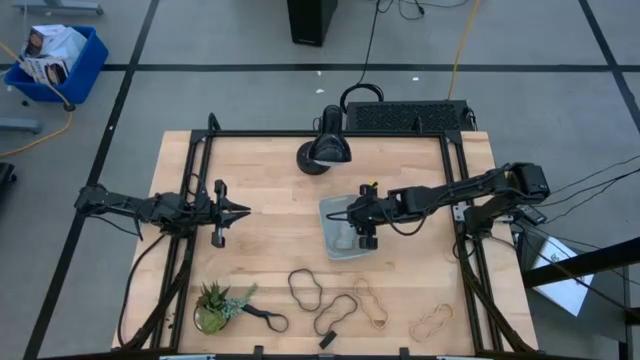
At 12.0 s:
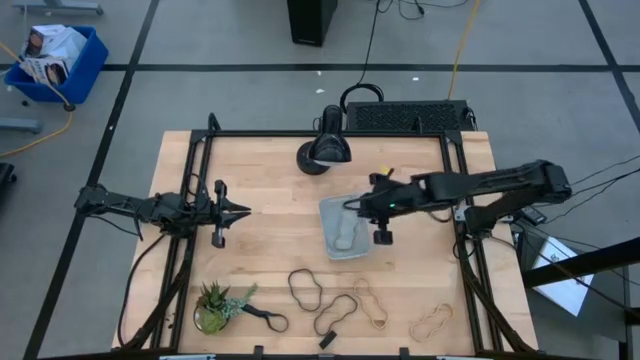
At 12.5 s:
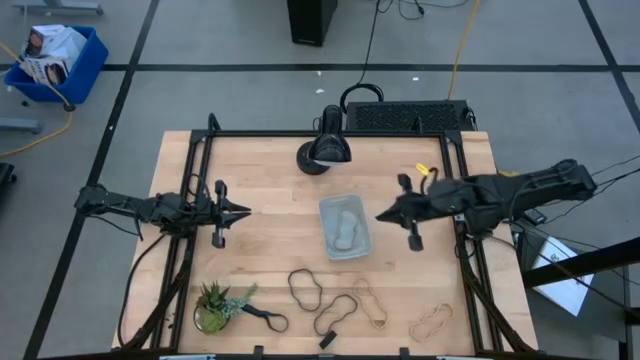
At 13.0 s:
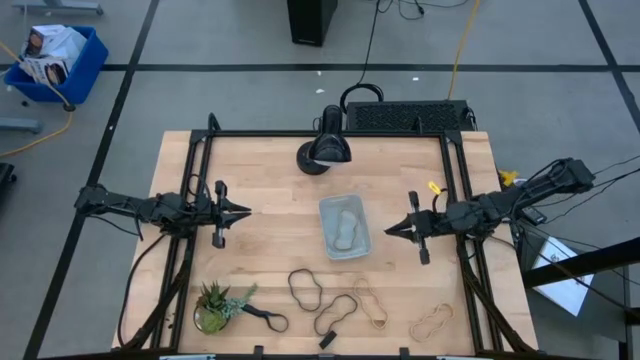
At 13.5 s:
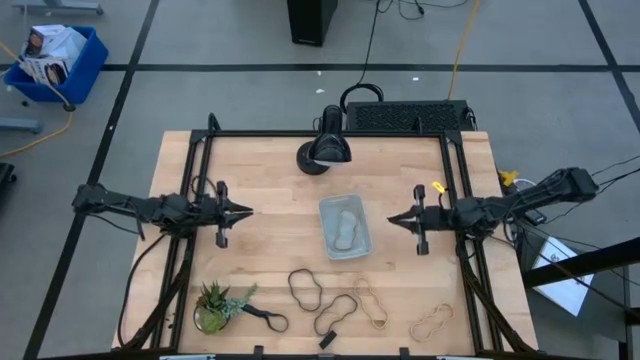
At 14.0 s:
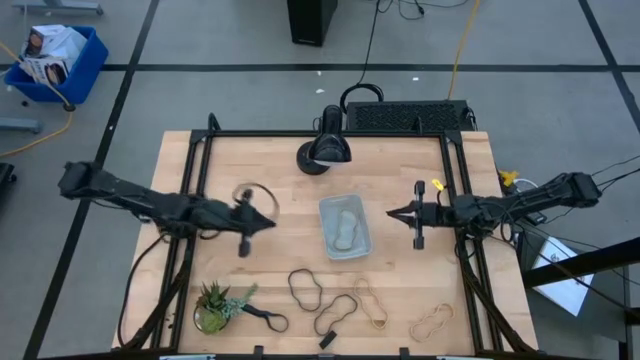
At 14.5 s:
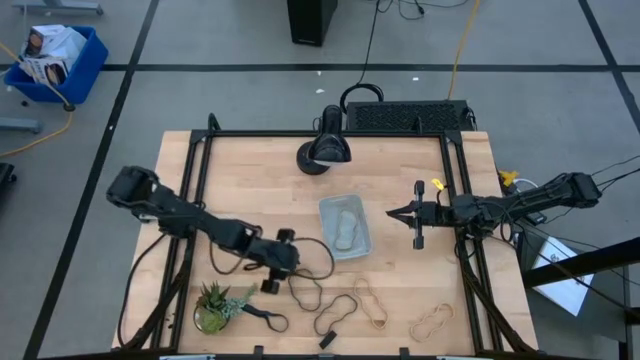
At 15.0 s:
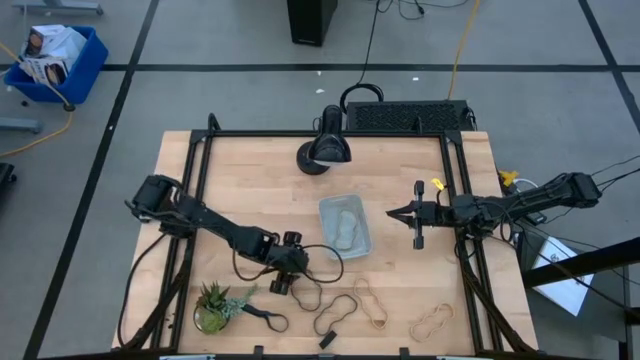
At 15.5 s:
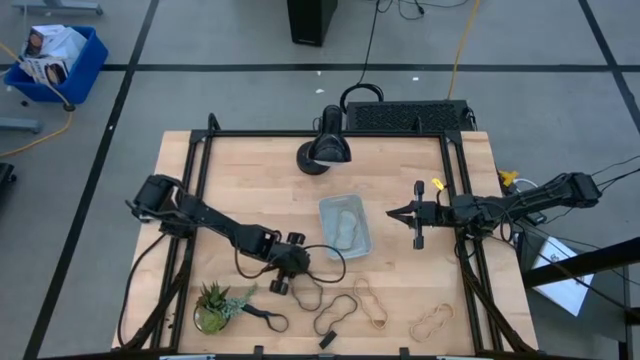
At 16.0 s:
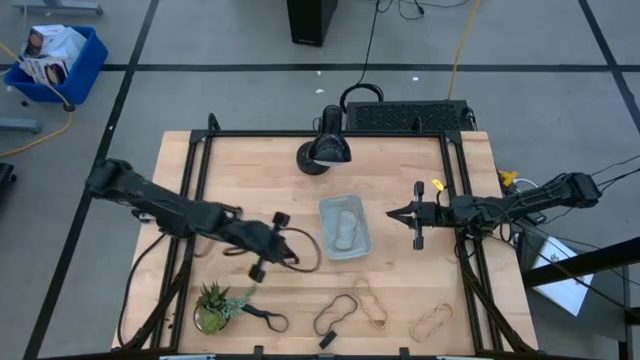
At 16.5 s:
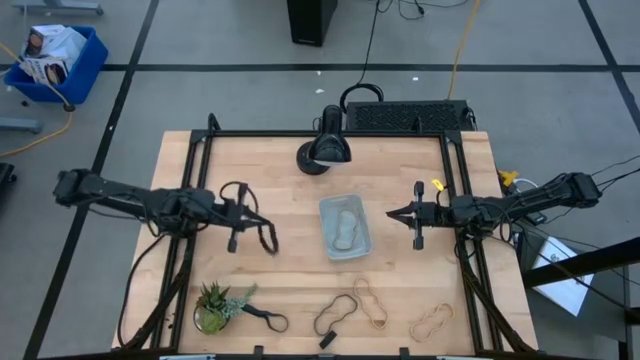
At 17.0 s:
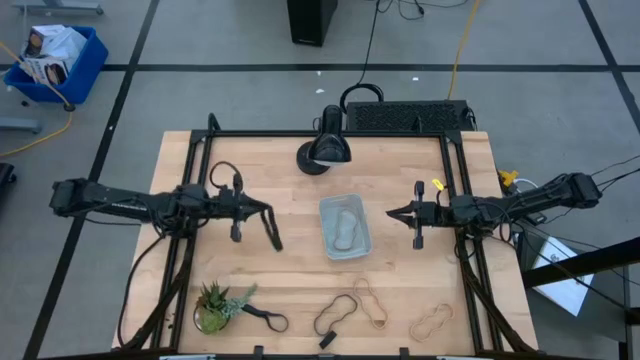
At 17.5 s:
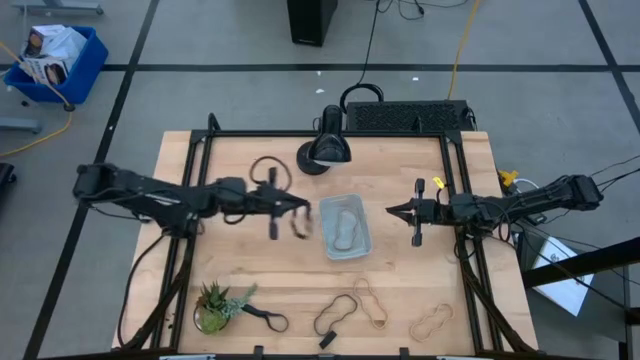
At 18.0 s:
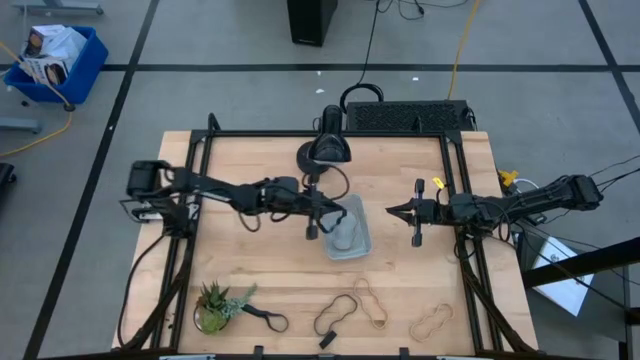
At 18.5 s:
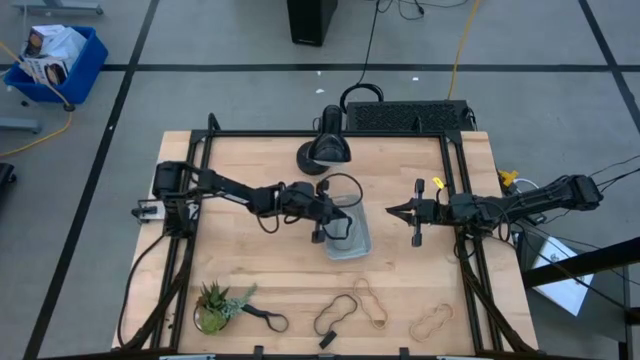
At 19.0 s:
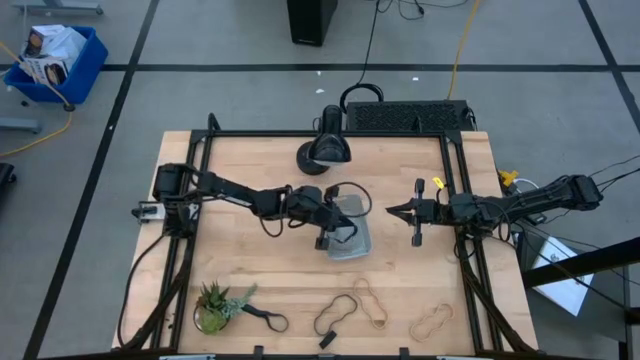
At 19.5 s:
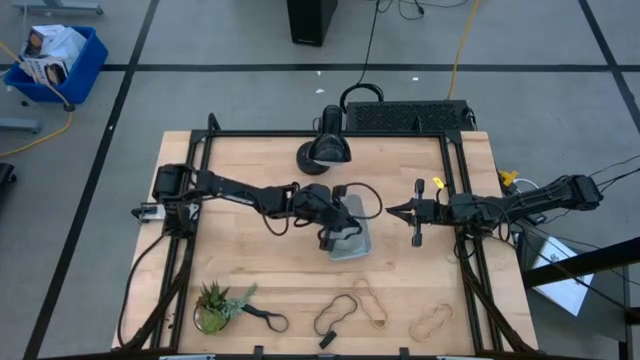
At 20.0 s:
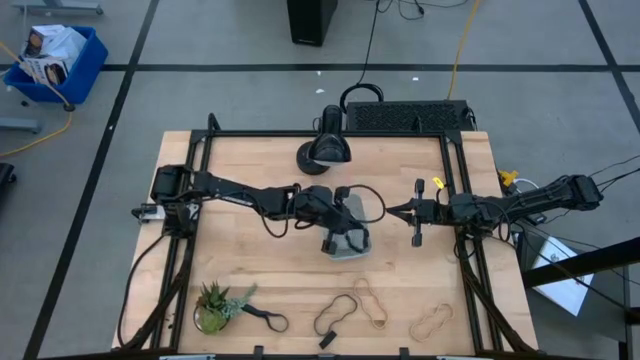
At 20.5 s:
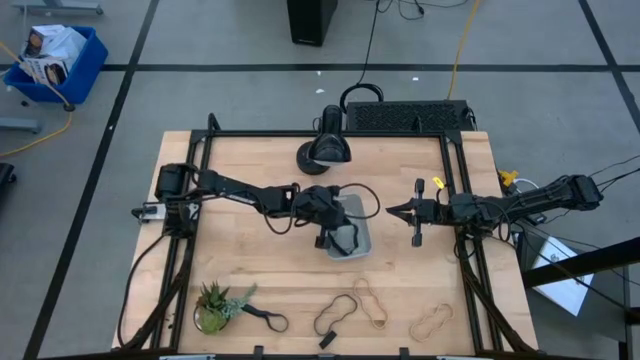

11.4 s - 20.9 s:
Task: Pick and place rubber bands into bin
Put the middle black rubber band into the gray bin

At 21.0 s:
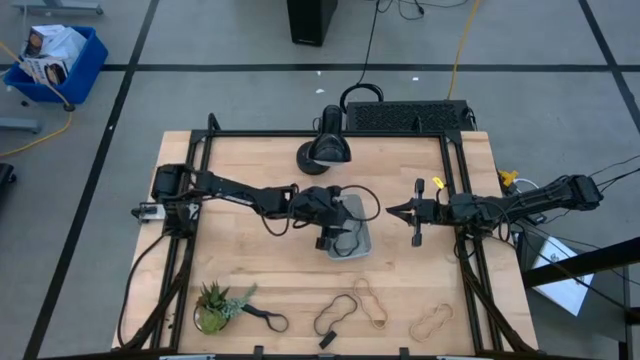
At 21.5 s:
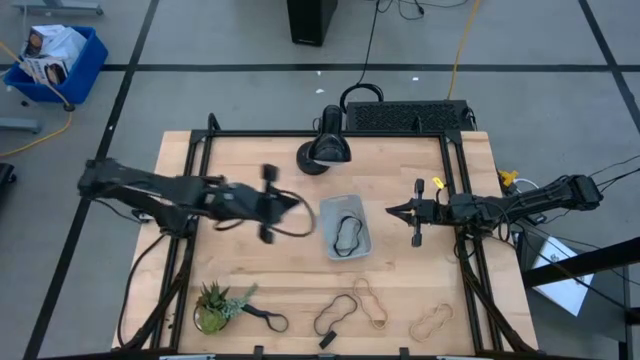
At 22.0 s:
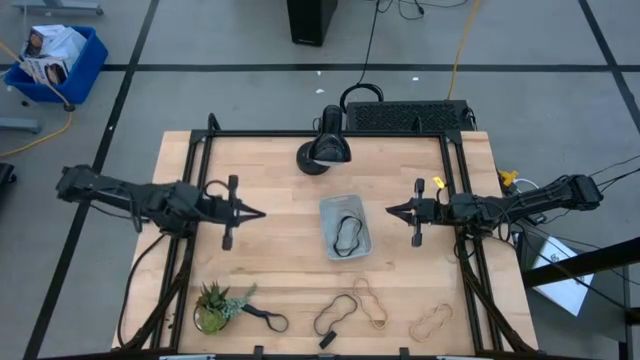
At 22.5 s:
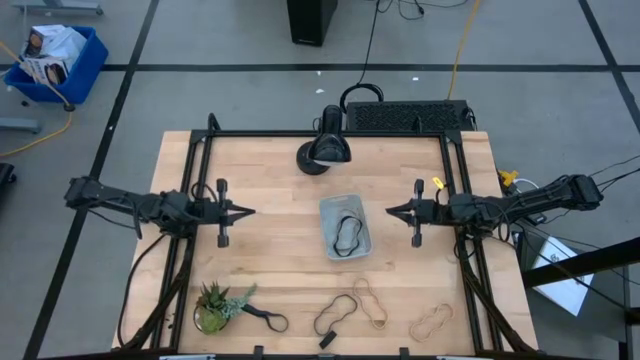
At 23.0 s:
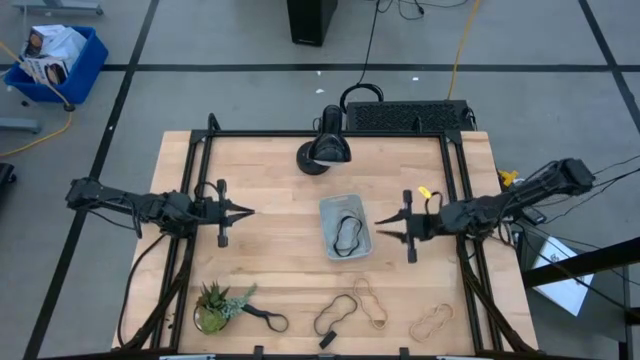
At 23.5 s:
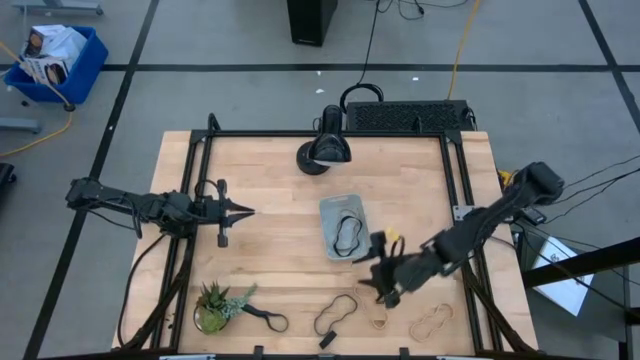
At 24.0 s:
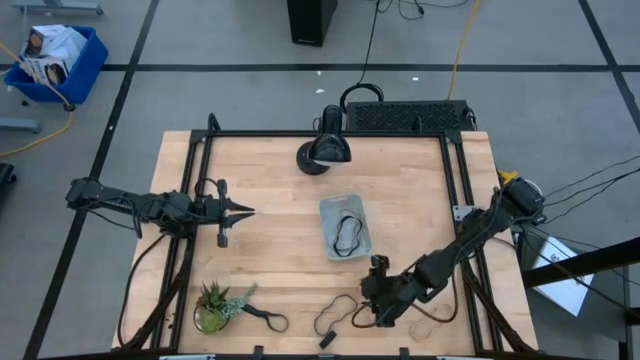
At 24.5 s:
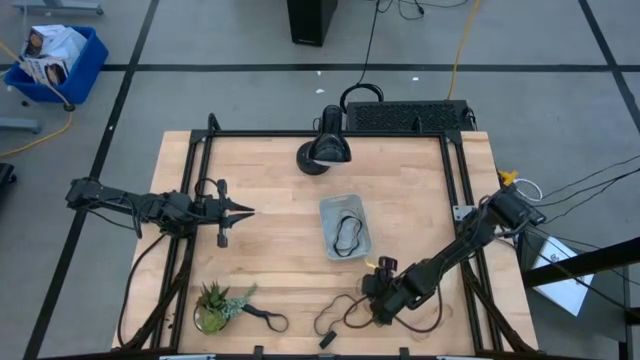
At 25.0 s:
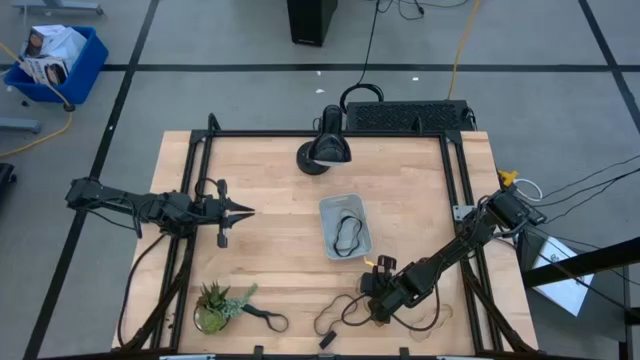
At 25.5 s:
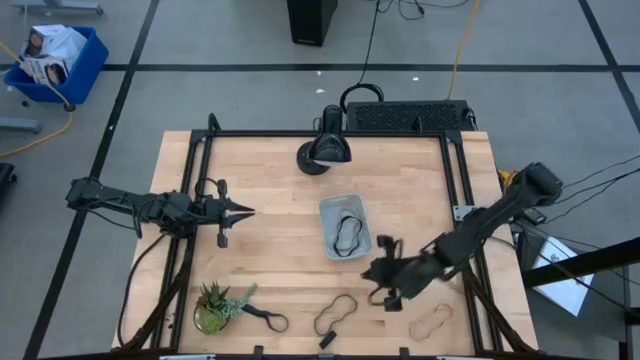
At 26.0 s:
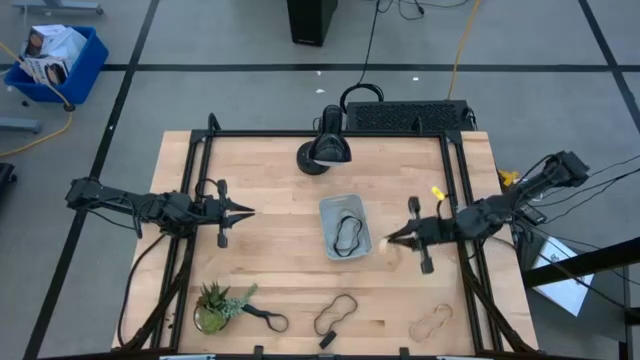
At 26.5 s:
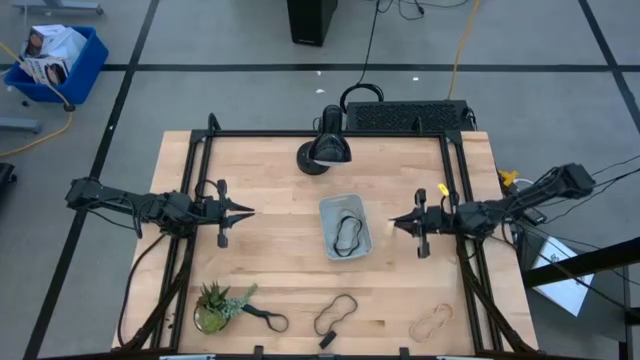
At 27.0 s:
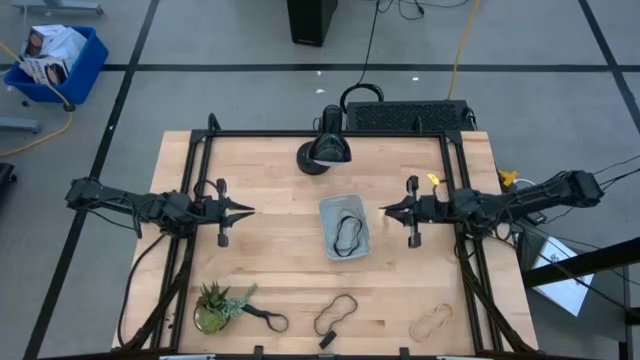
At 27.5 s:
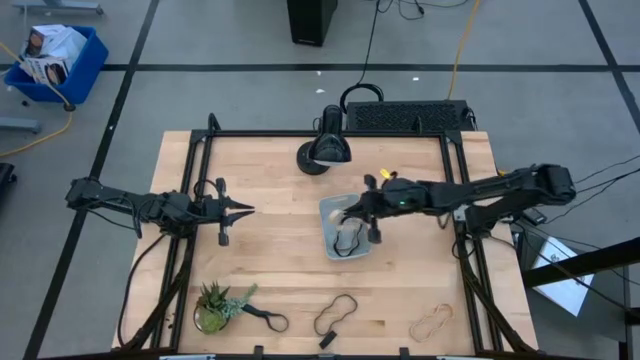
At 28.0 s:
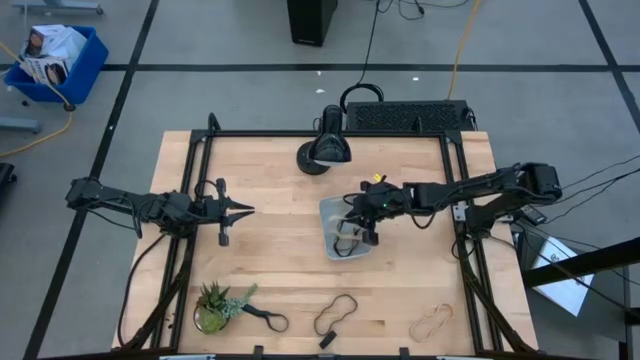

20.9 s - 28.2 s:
Put the left light orange rubber band into the gray bin

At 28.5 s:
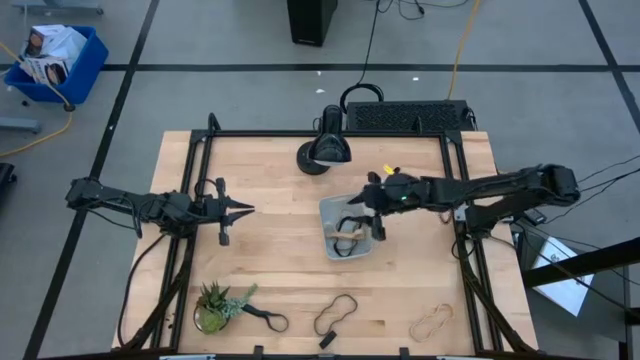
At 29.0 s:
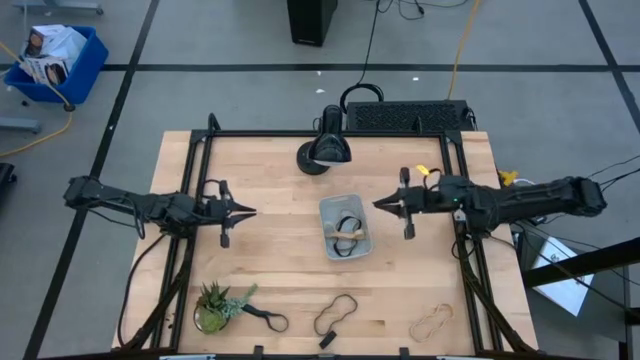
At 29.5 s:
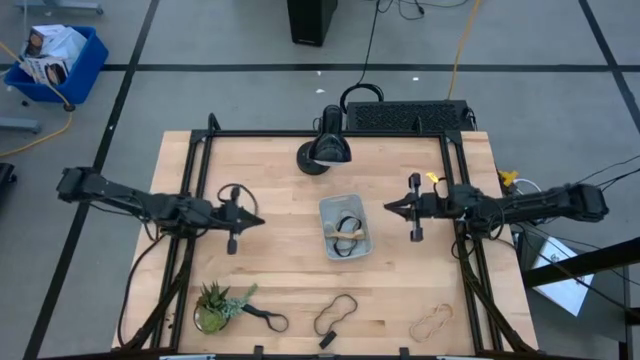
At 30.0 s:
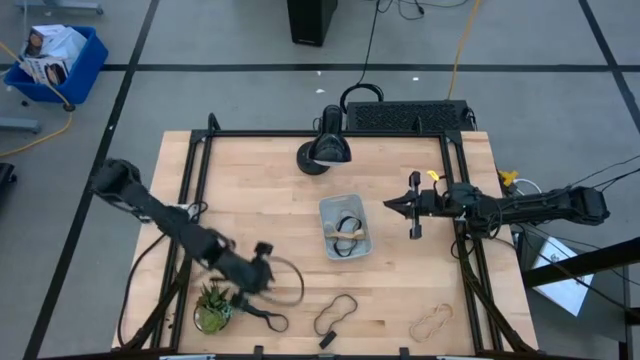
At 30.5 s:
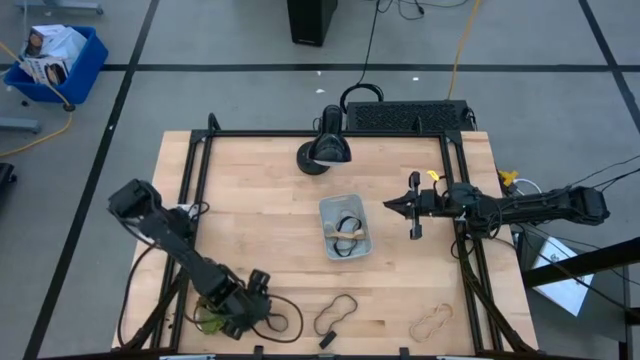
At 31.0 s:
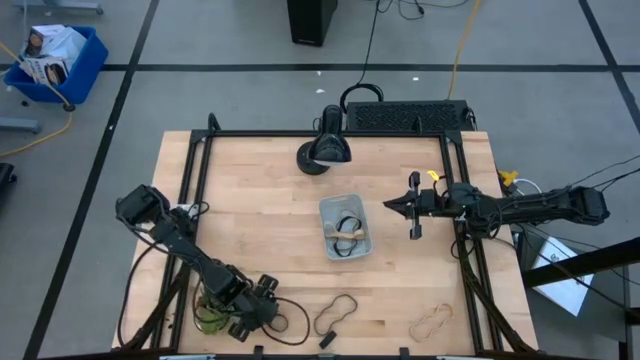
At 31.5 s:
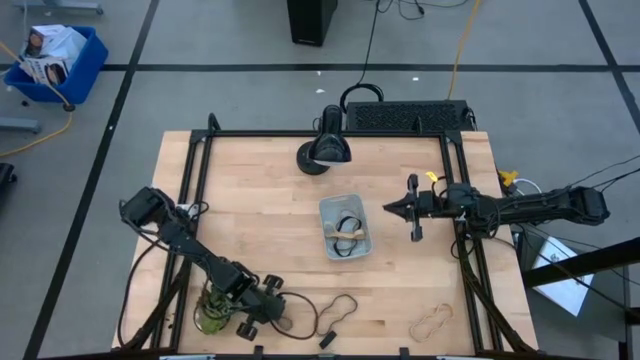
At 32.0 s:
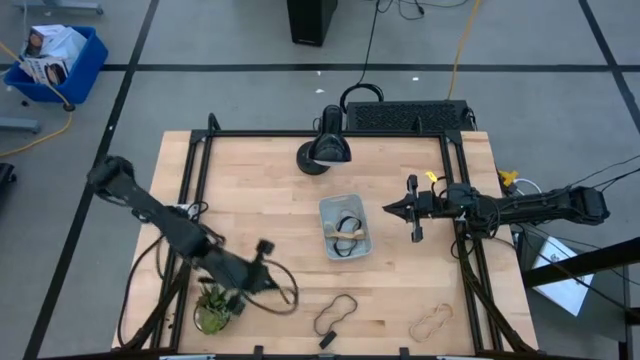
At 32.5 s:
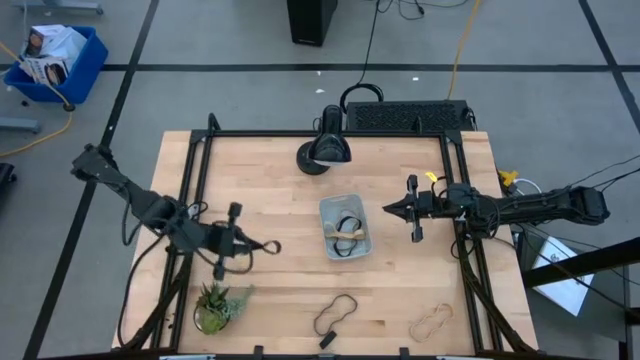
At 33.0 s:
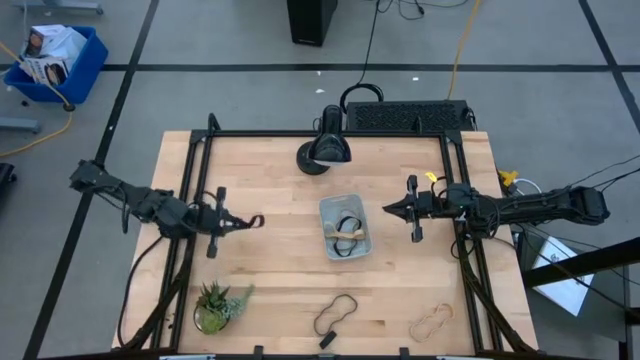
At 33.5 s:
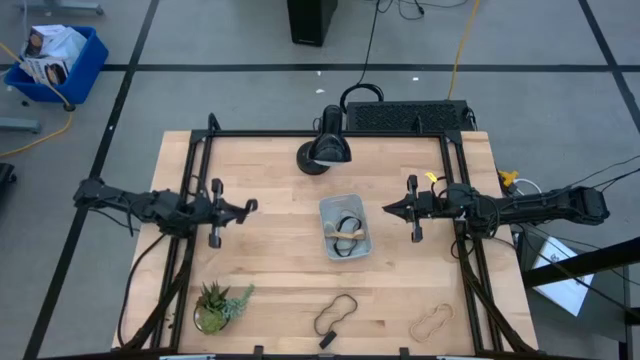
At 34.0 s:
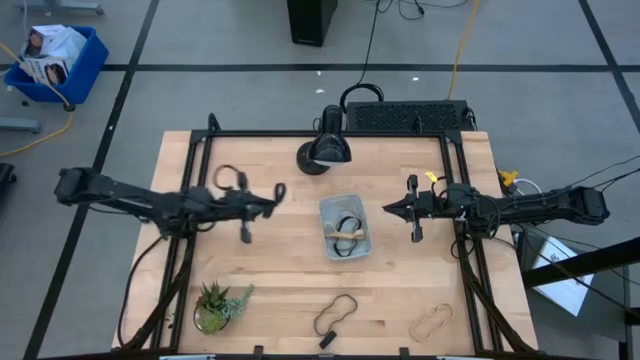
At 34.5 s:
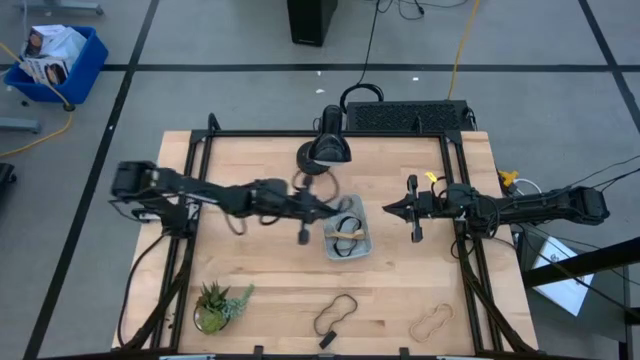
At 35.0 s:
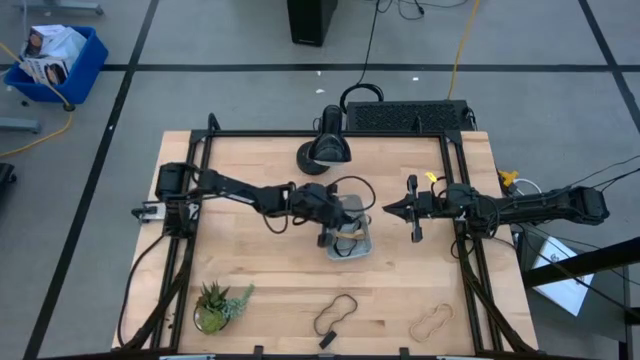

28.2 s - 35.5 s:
Put the left black rubber band into the gray bin
